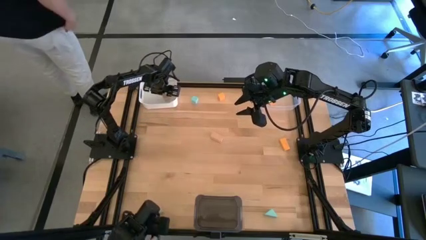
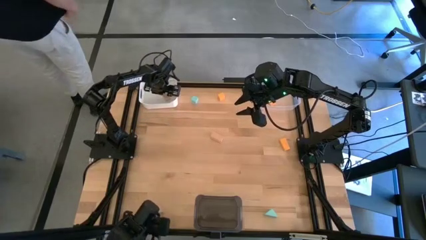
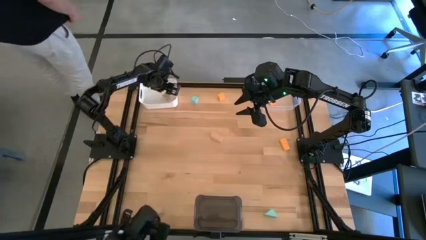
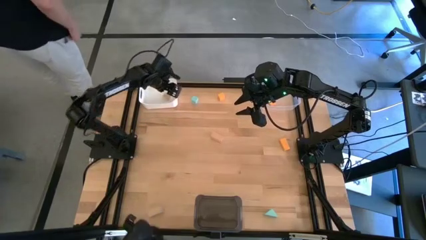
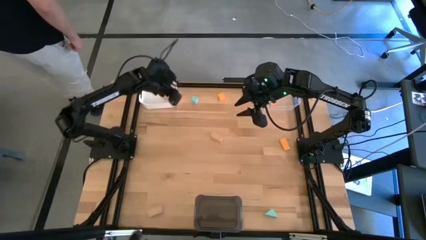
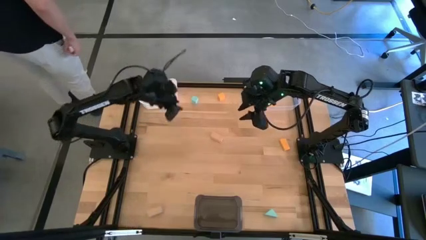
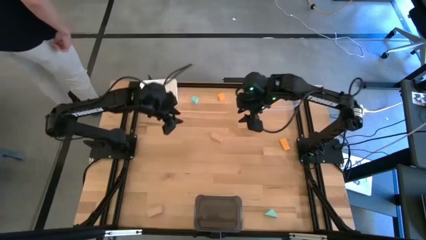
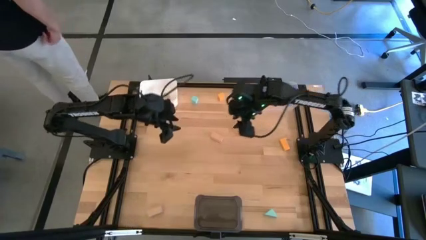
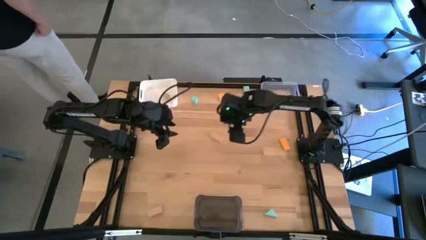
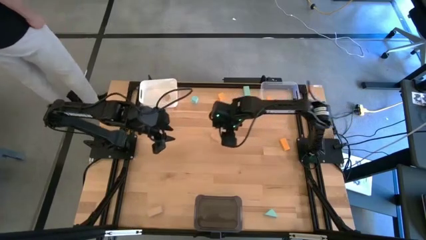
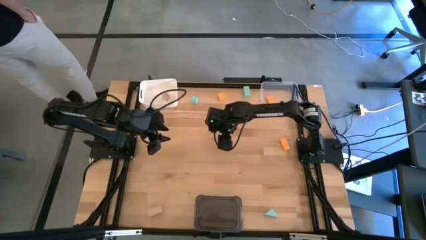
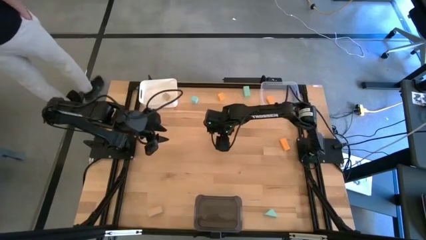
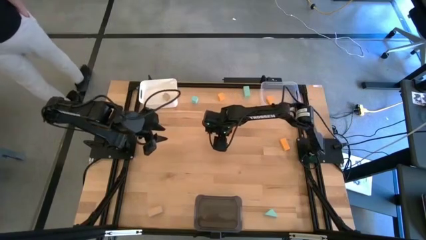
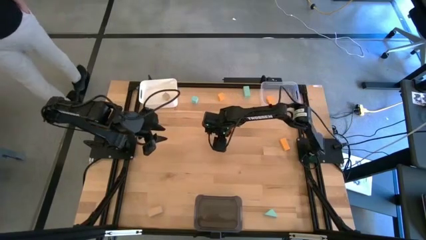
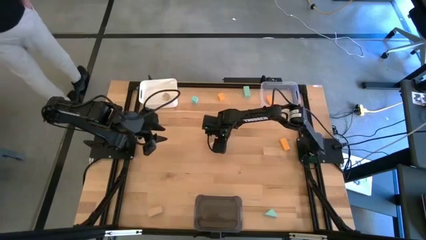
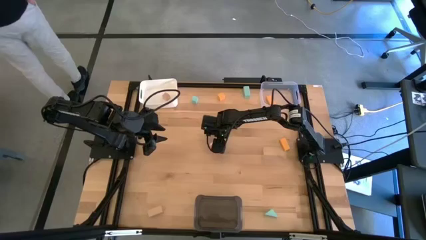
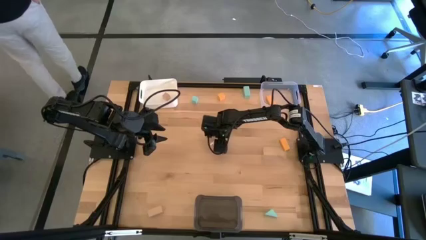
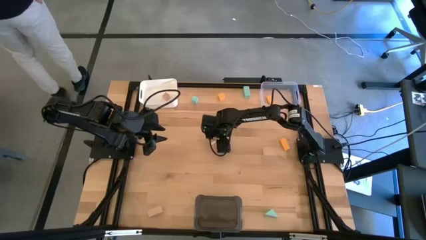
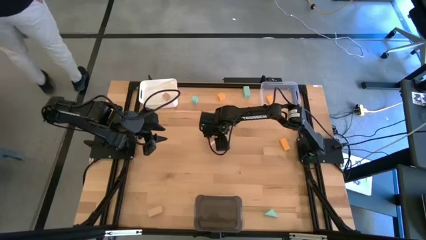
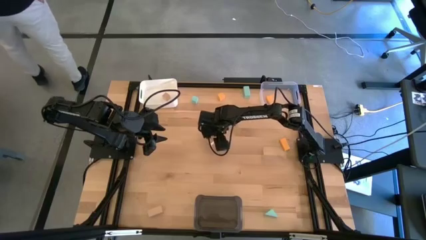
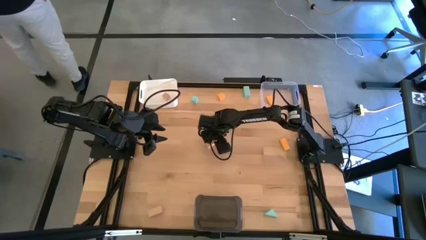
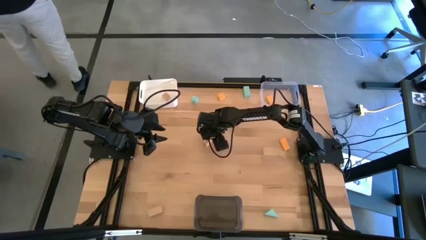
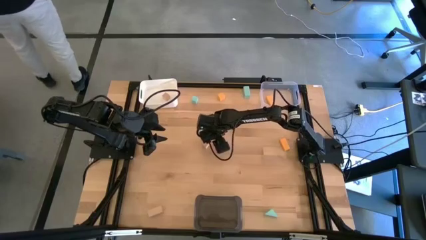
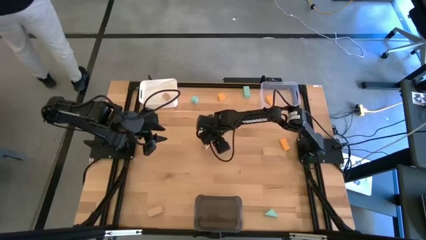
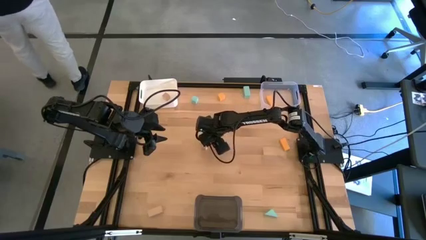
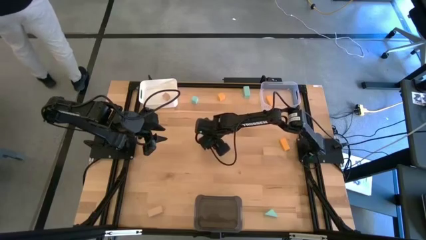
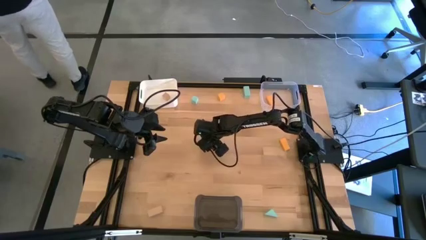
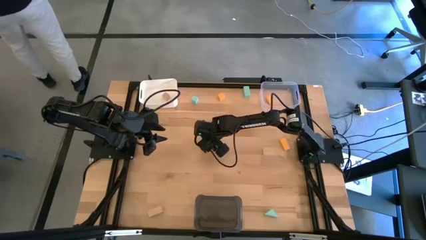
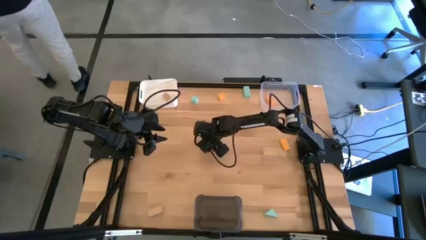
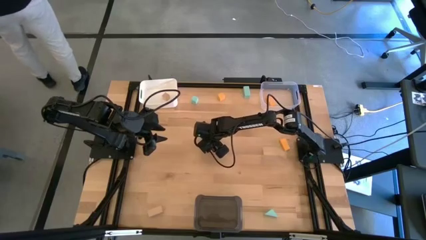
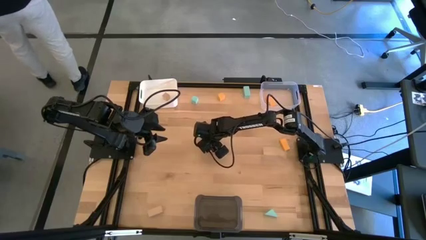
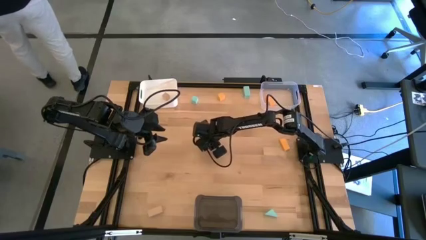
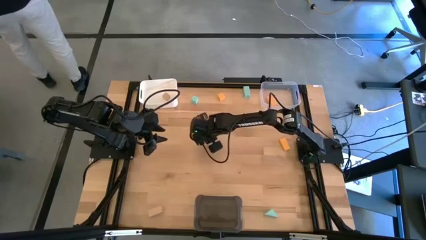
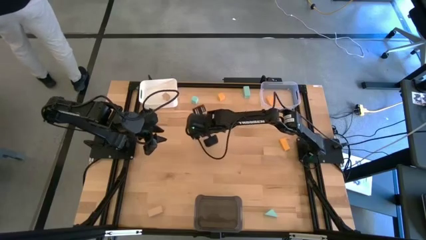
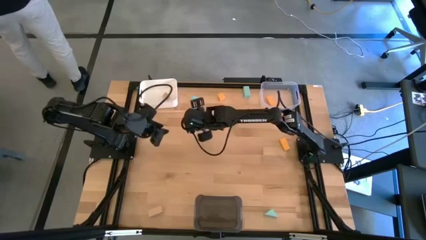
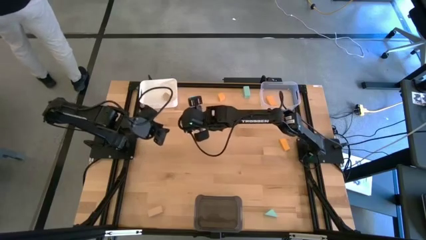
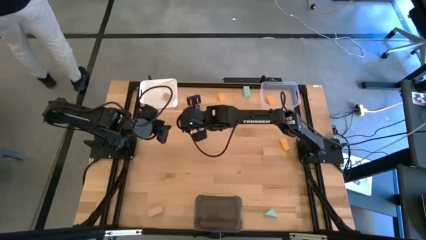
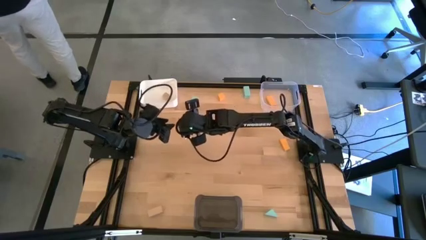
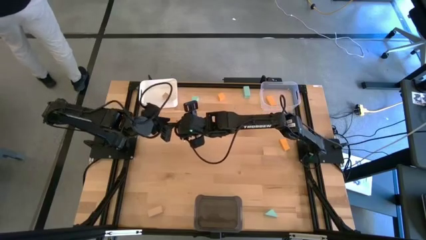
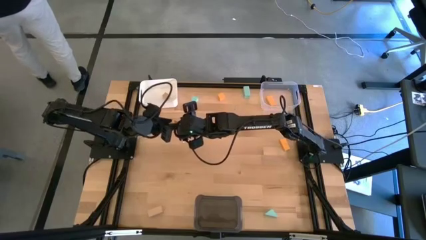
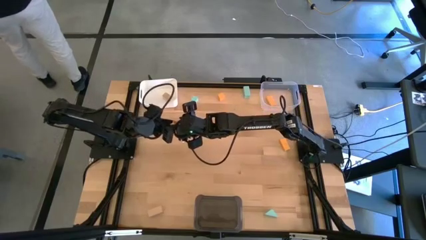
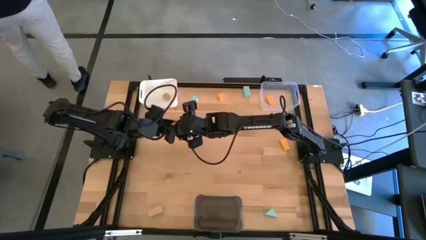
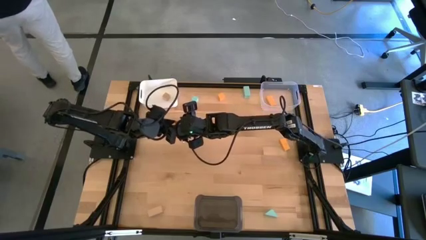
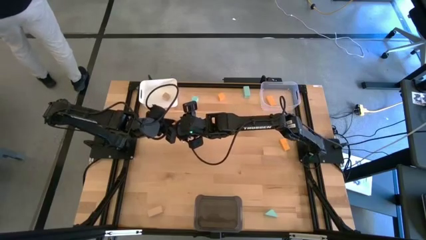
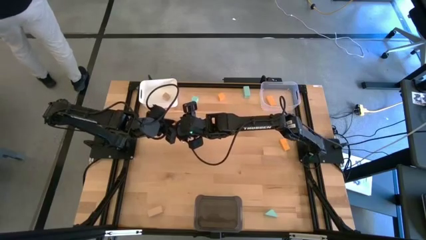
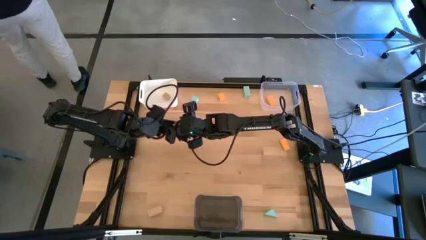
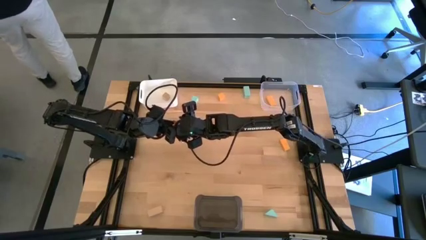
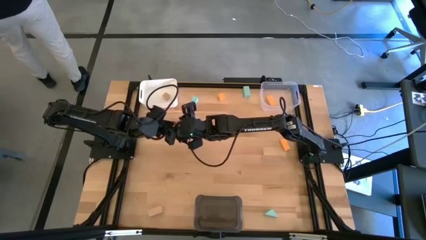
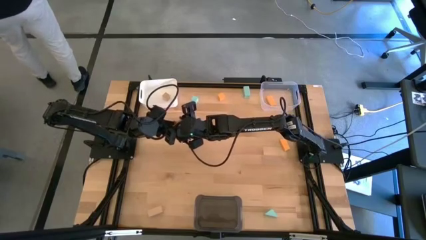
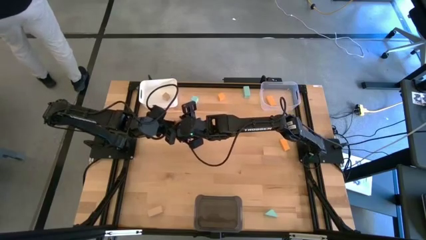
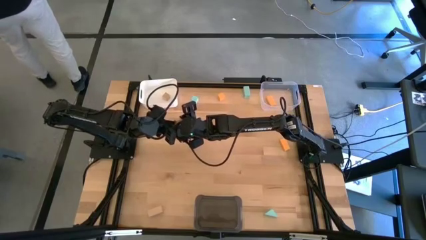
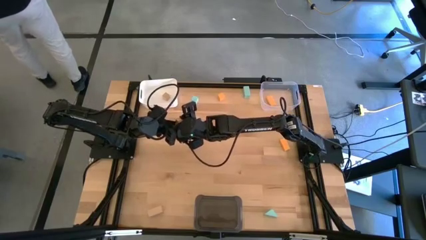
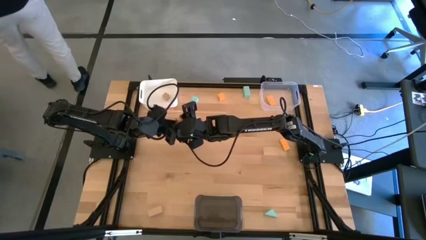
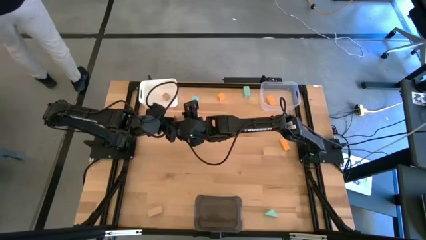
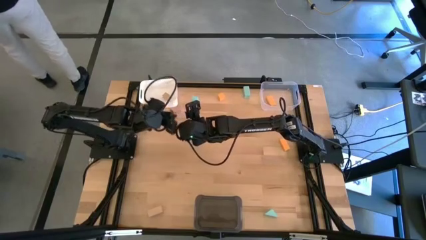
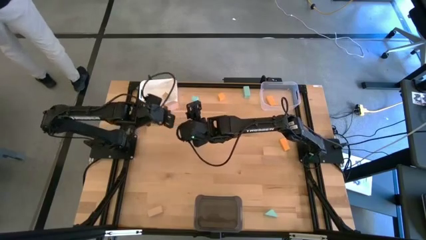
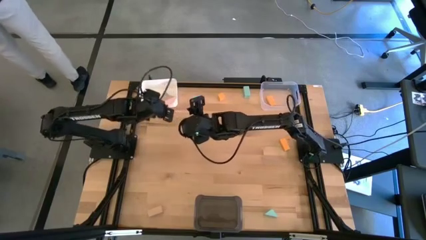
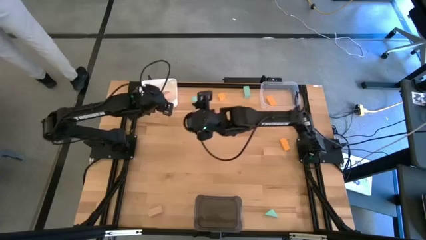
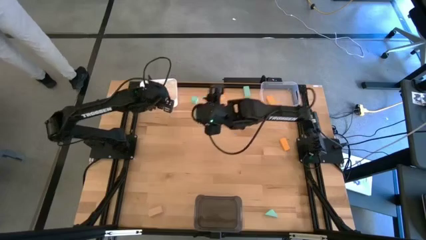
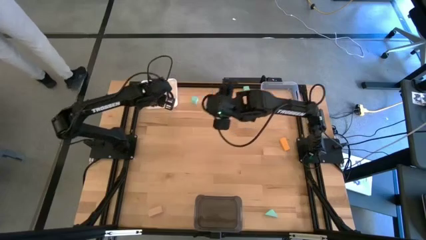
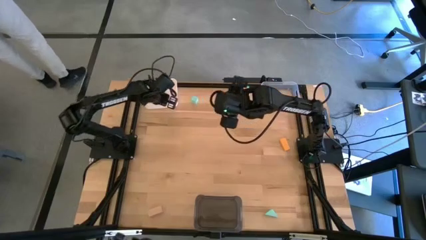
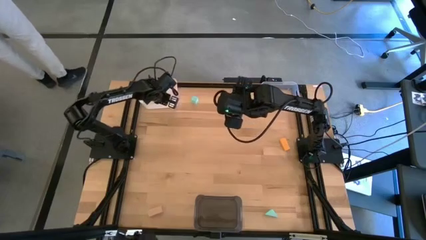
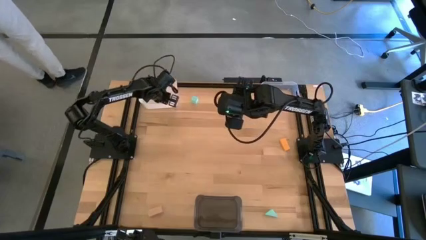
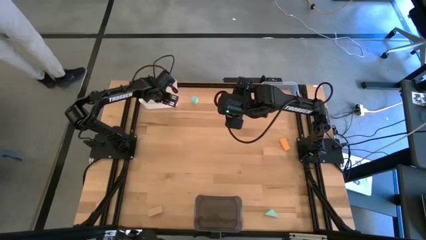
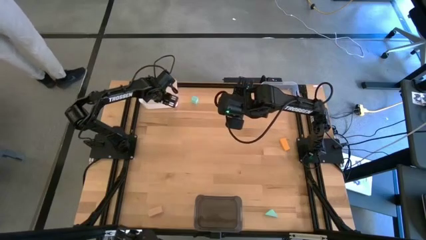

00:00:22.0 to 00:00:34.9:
Task: Sort & place blocks by color
Put the top brown block into the white bin

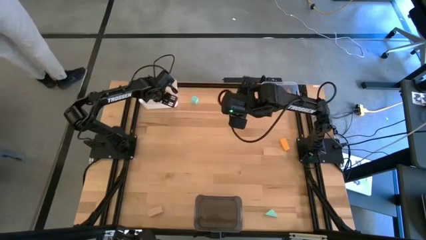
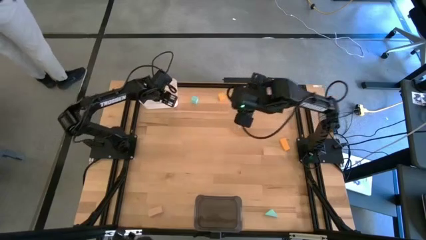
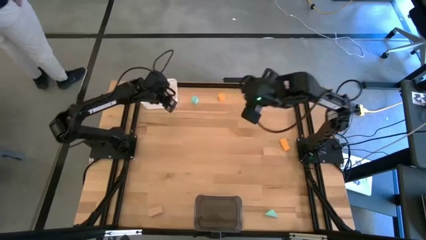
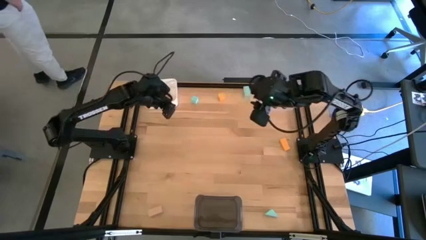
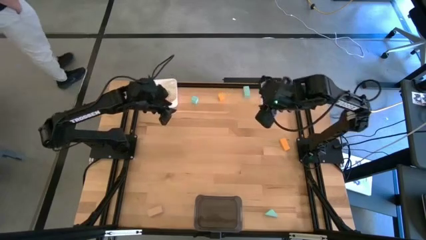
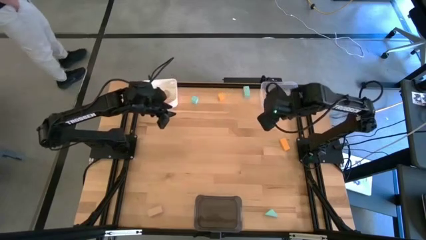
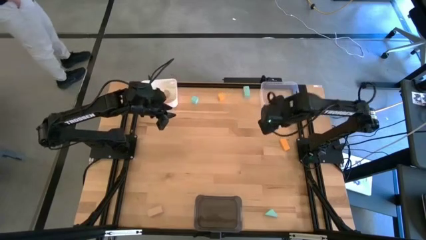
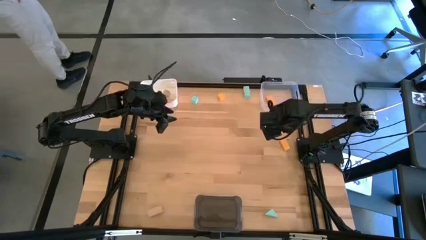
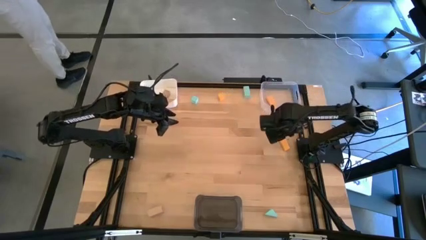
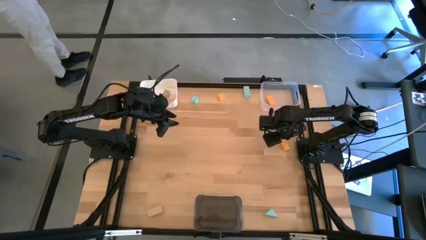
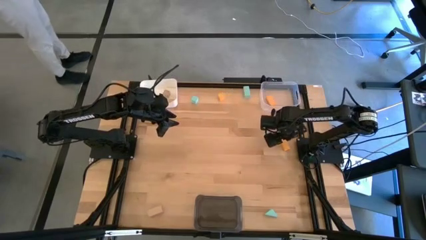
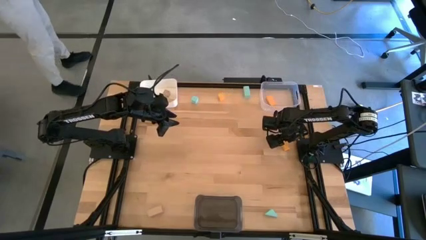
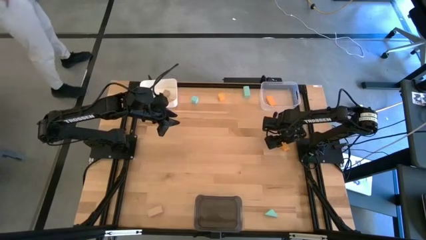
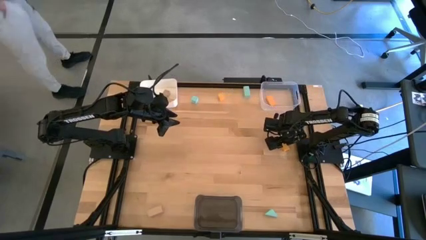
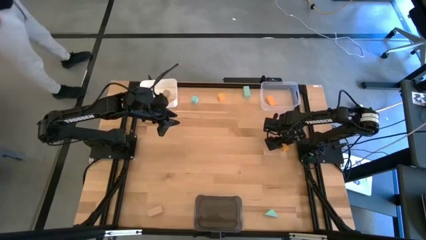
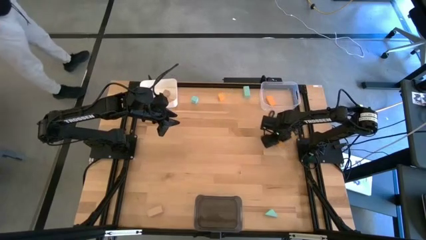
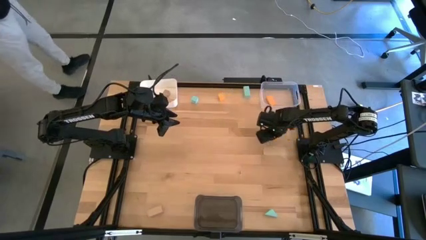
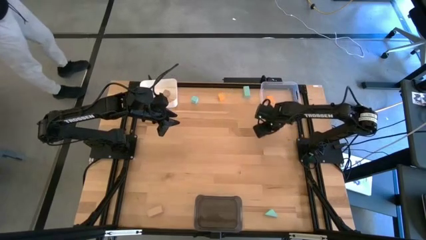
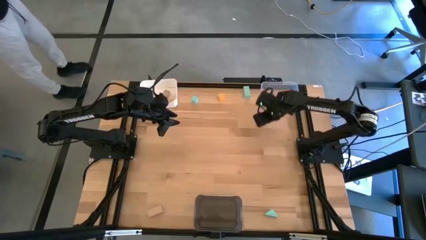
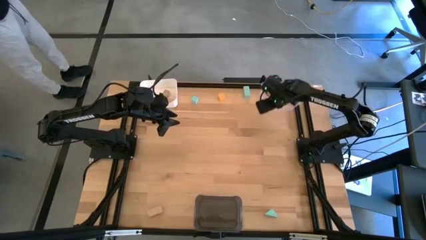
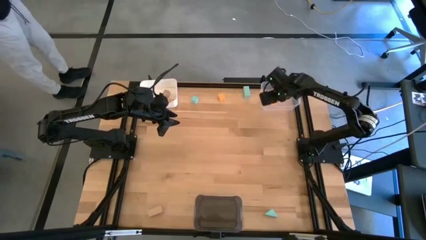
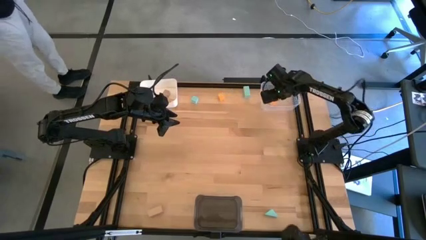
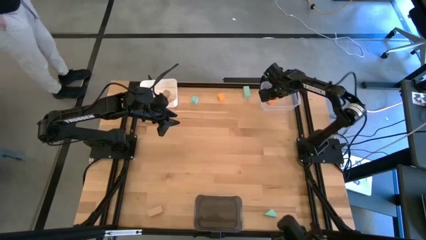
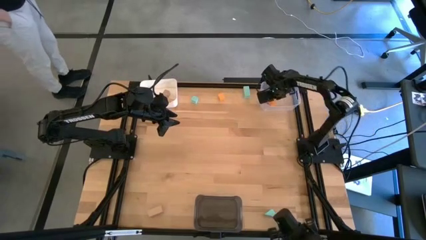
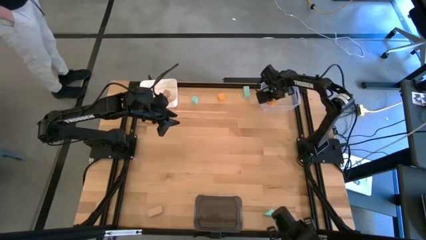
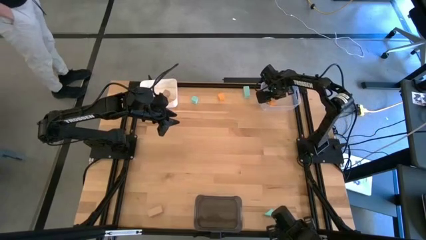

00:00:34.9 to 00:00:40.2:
Put the bottom yellow block into the transparent bin
